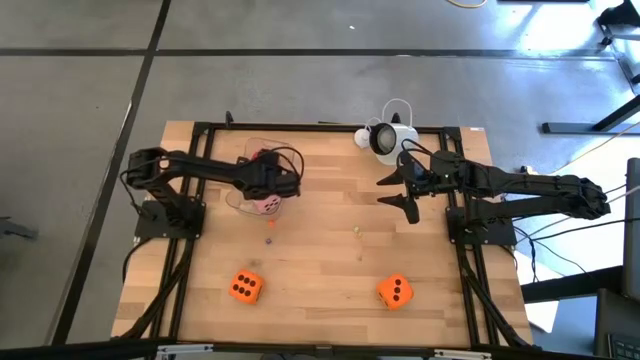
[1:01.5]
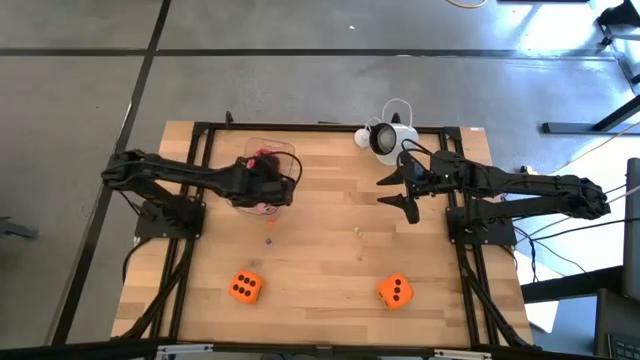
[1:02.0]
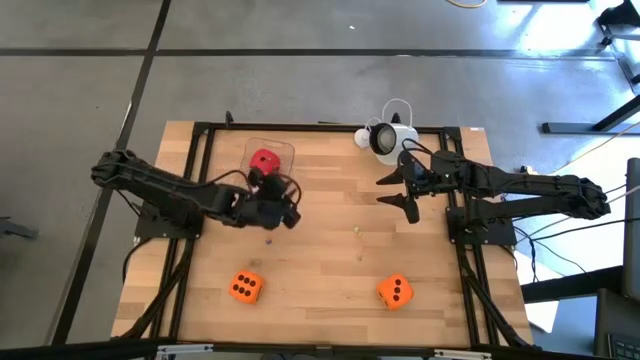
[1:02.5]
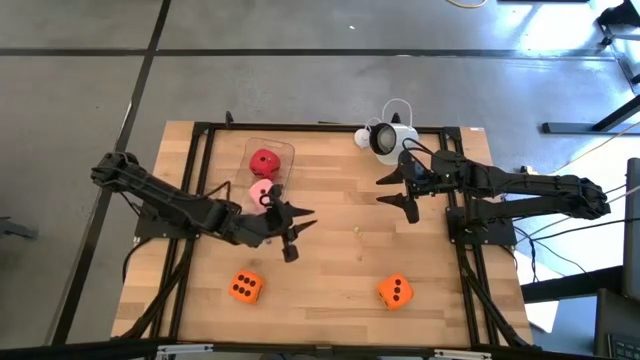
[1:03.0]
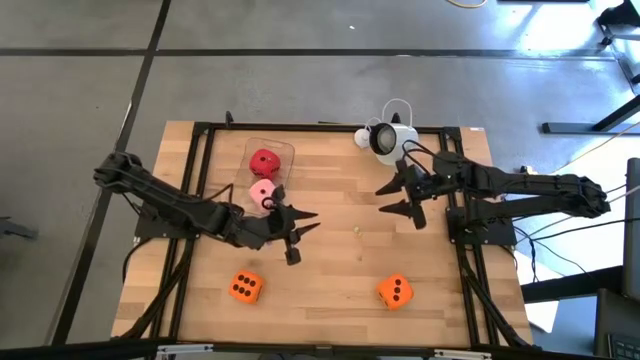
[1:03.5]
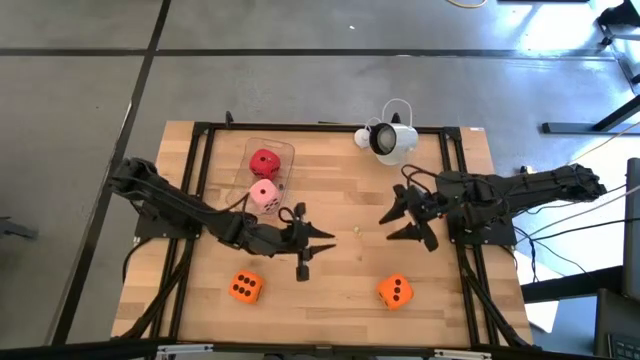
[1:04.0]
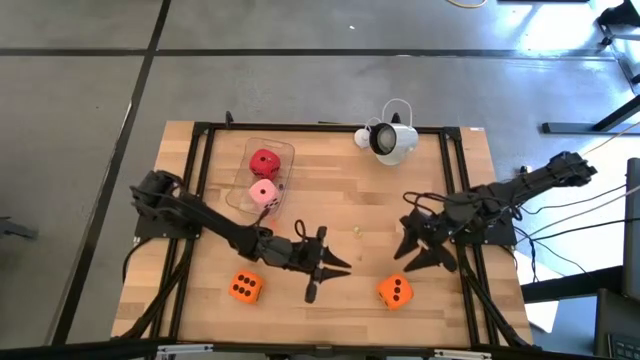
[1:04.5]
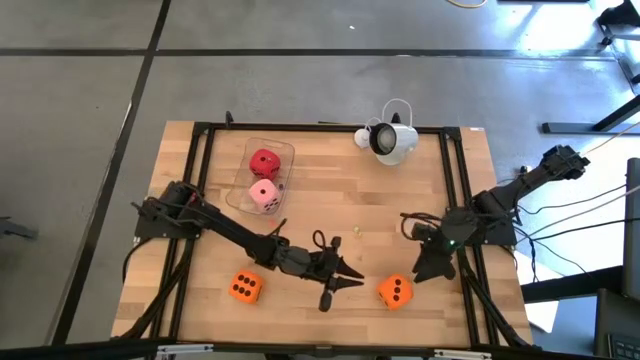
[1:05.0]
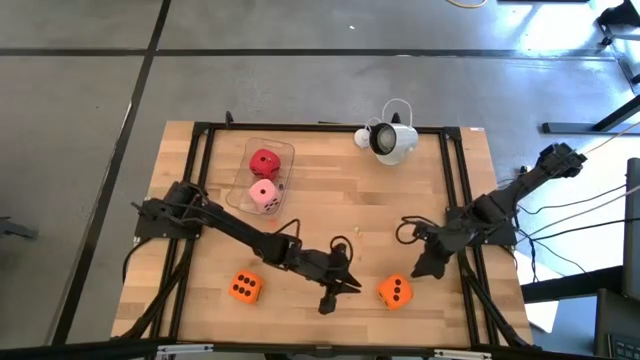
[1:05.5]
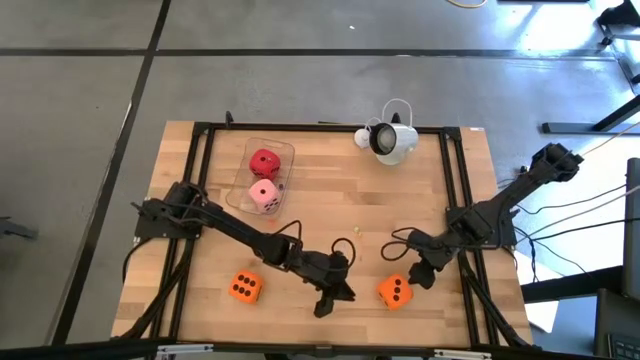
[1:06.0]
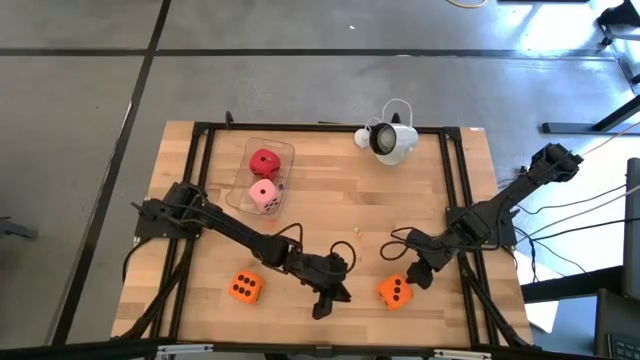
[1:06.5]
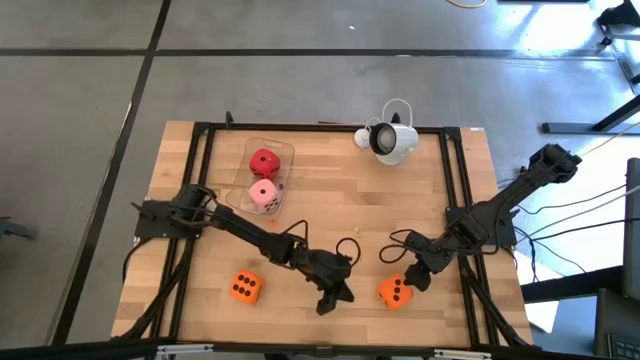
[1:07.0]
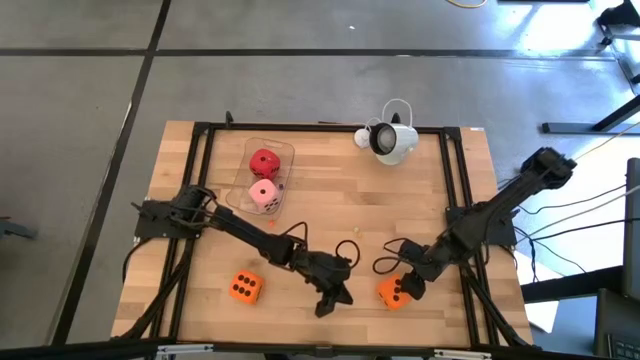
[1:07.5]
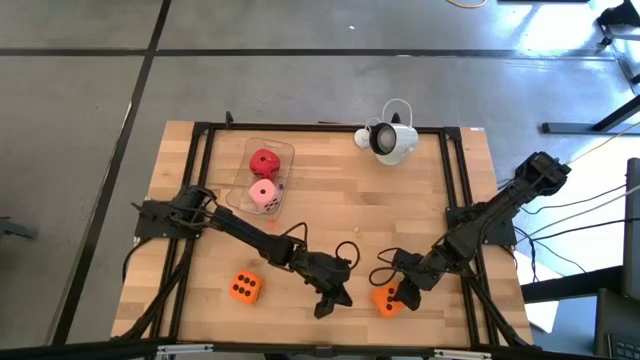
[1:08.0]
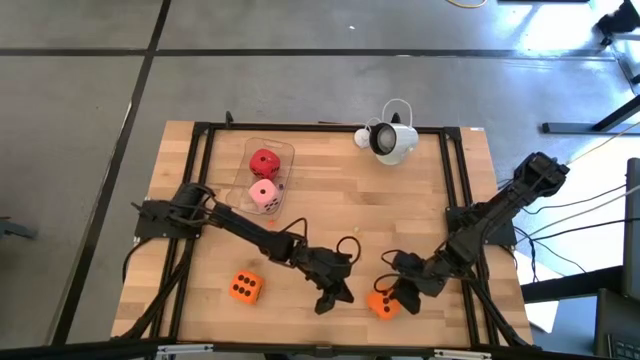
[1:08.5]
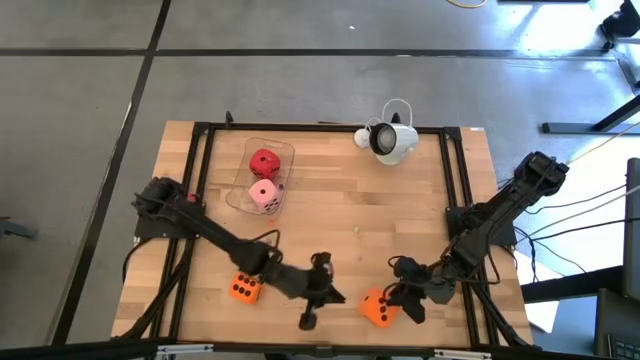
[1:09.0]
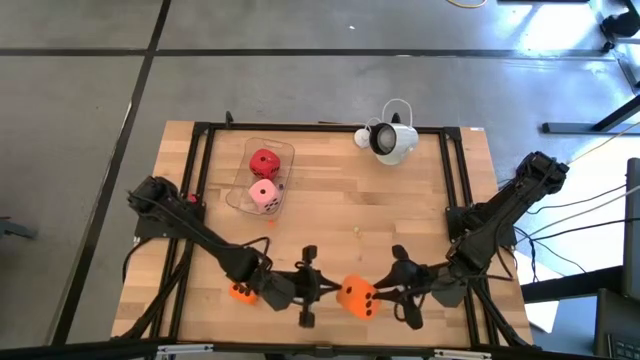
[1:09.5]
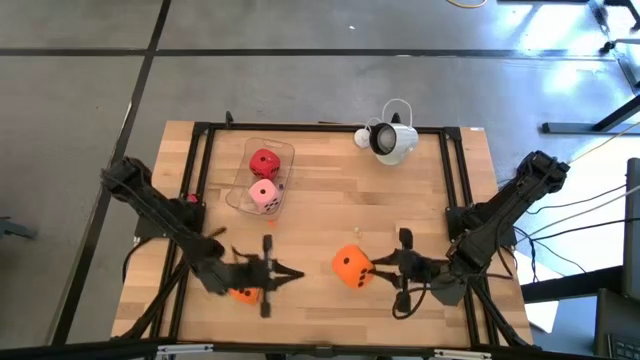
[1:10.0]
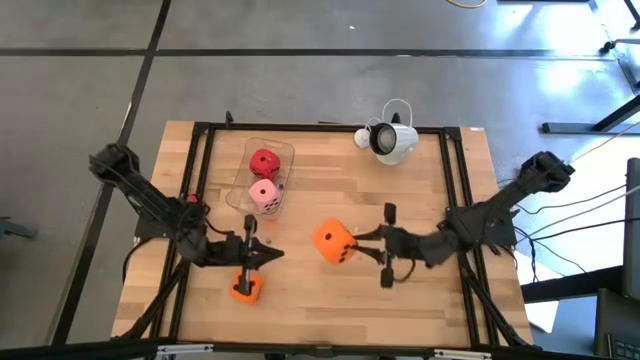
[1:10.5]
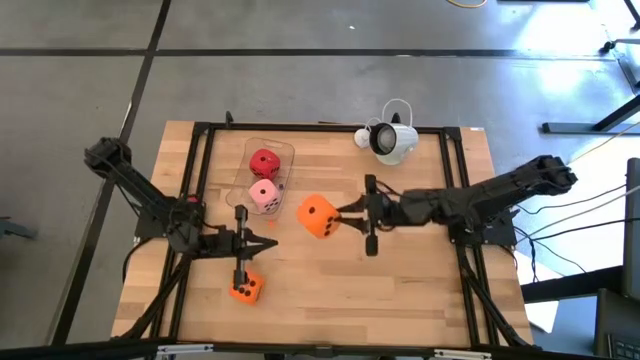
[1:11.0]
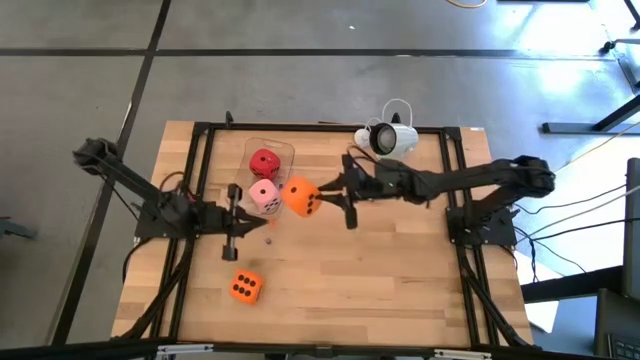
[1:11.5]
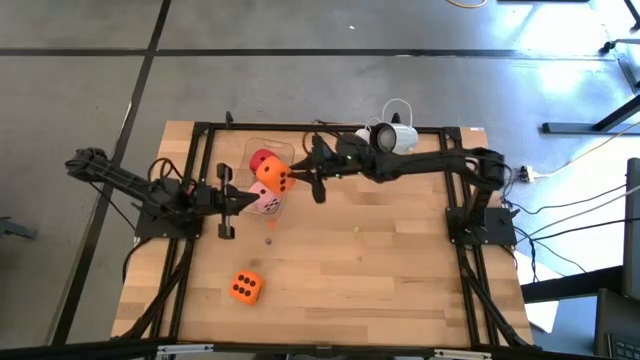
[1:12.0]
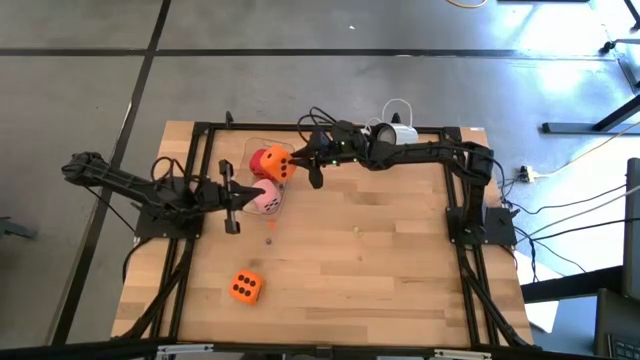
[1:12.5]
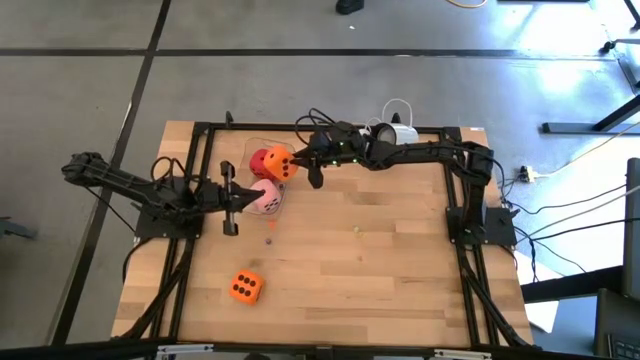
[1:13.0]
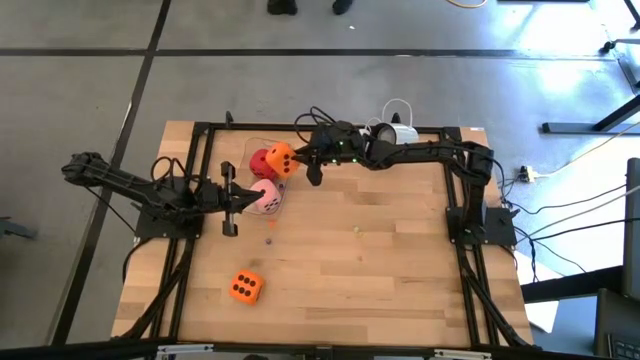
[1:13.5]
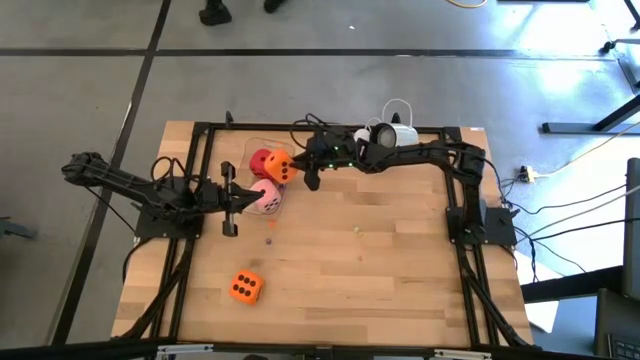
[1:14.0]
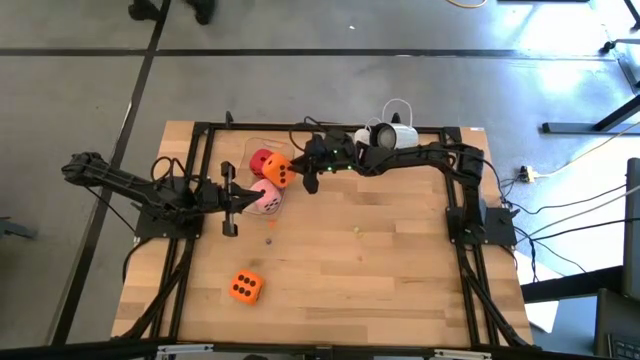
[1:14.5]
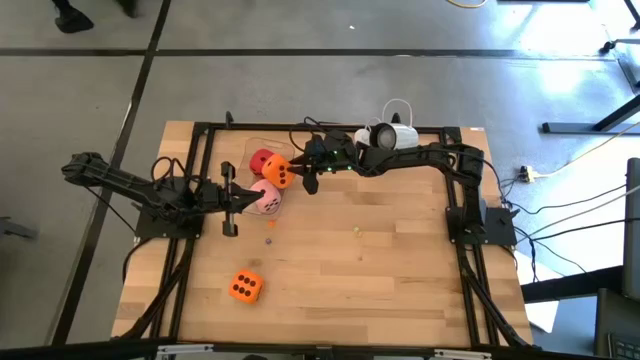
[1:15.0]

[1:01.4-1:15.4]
Task: Pick & Place Dice
Put the large orange die into the transparent bin

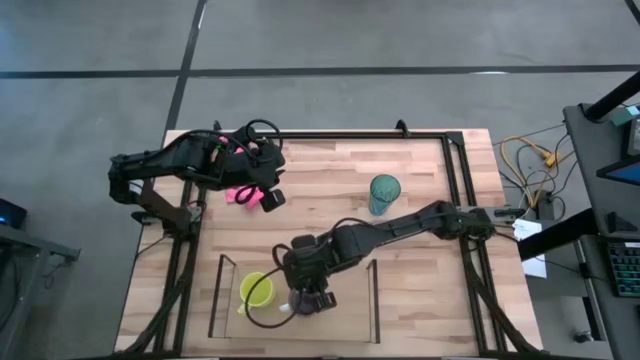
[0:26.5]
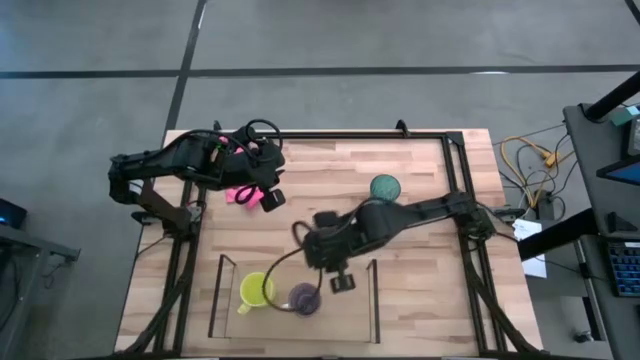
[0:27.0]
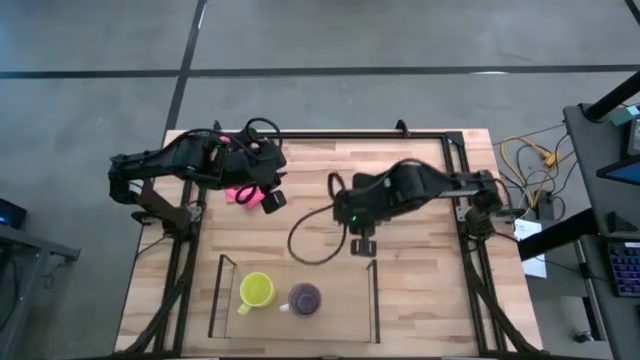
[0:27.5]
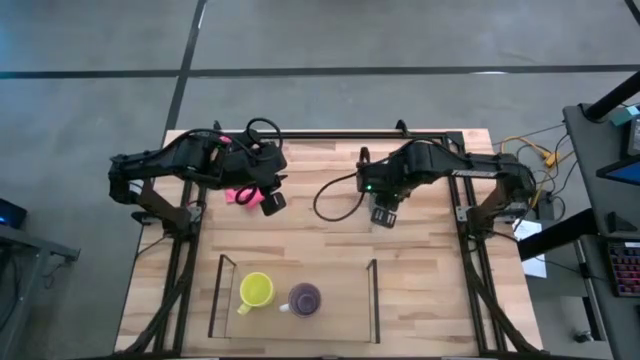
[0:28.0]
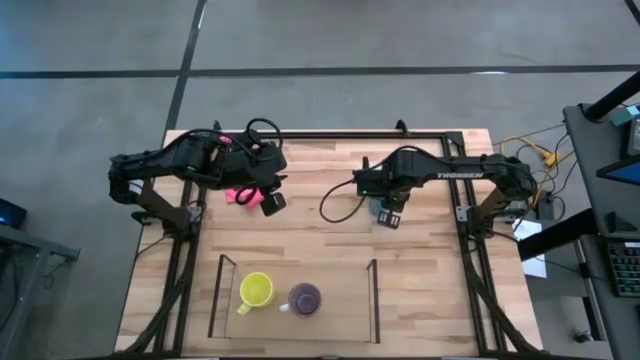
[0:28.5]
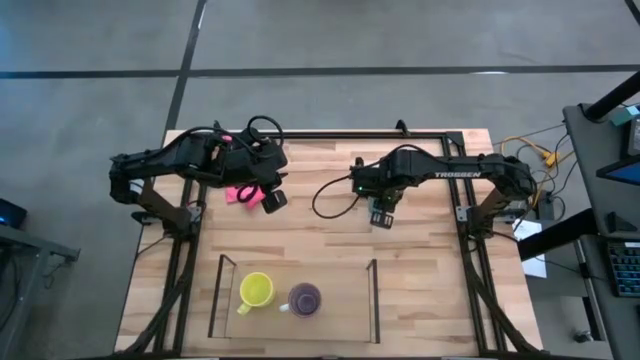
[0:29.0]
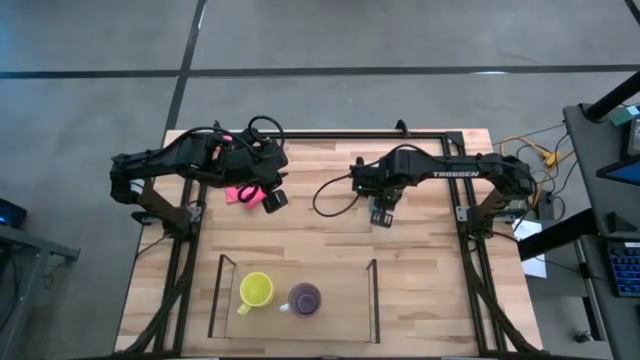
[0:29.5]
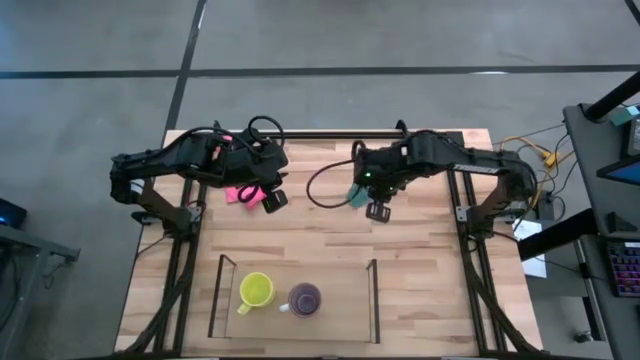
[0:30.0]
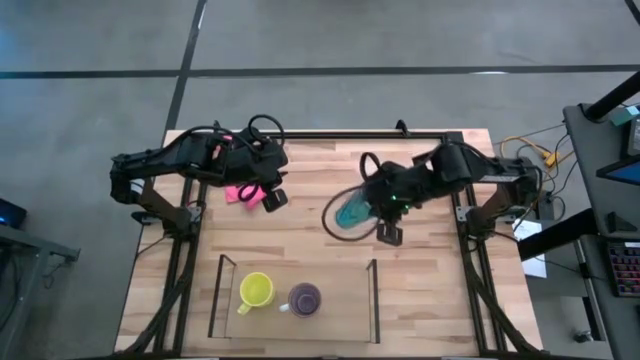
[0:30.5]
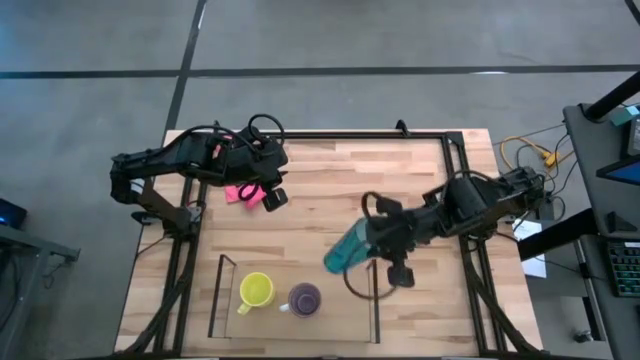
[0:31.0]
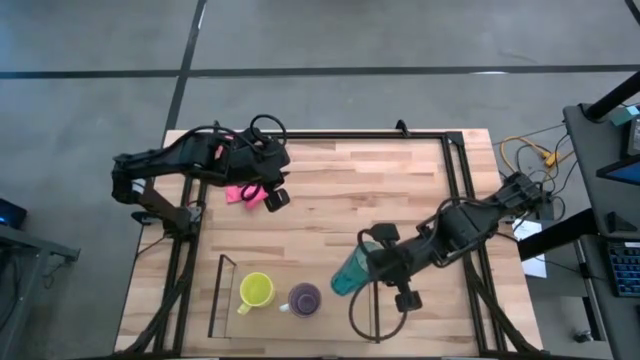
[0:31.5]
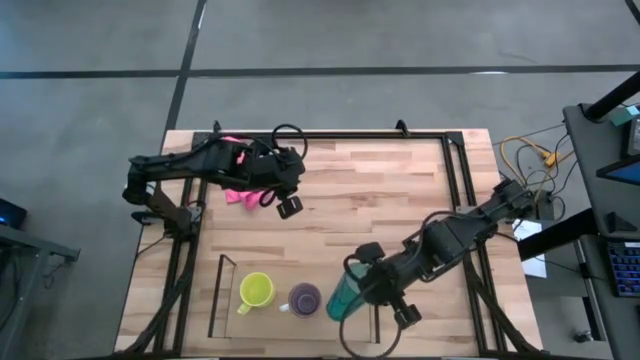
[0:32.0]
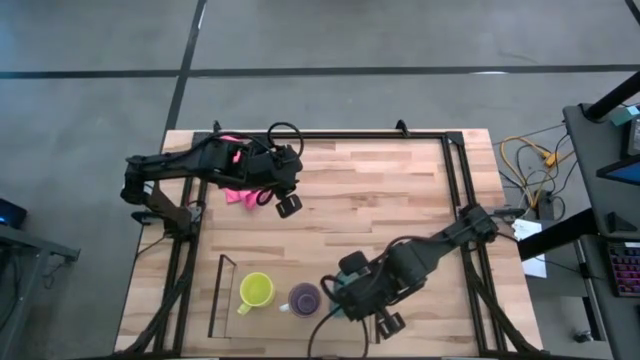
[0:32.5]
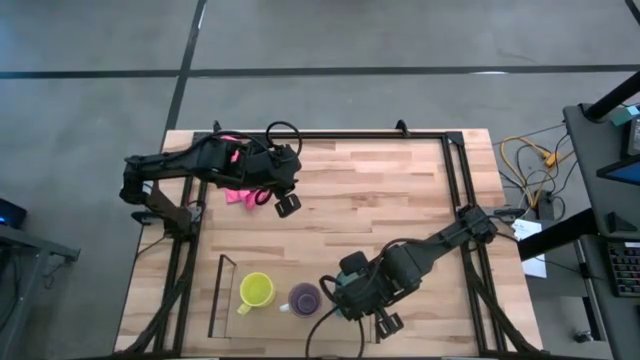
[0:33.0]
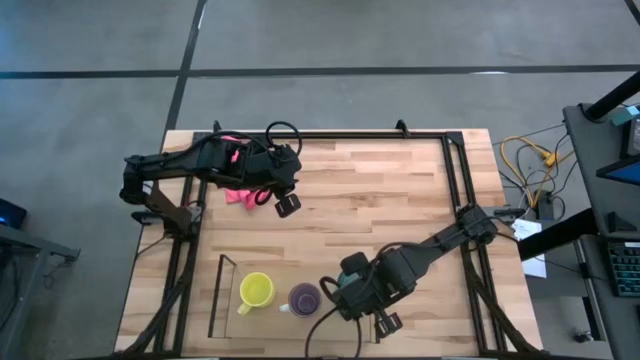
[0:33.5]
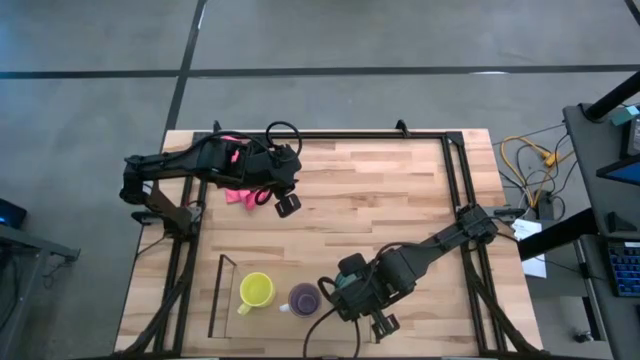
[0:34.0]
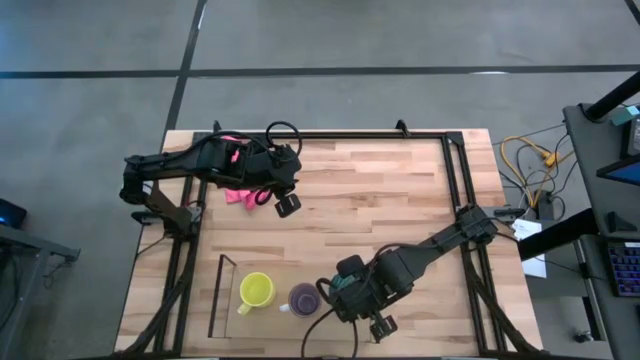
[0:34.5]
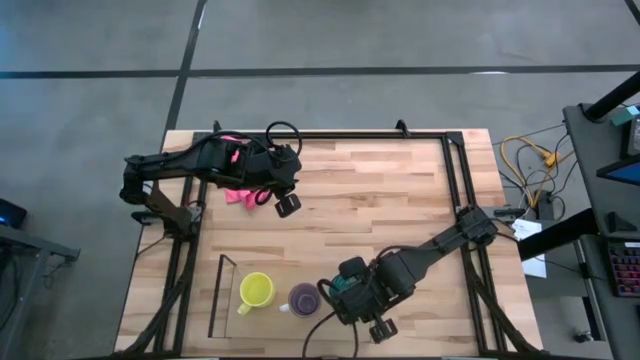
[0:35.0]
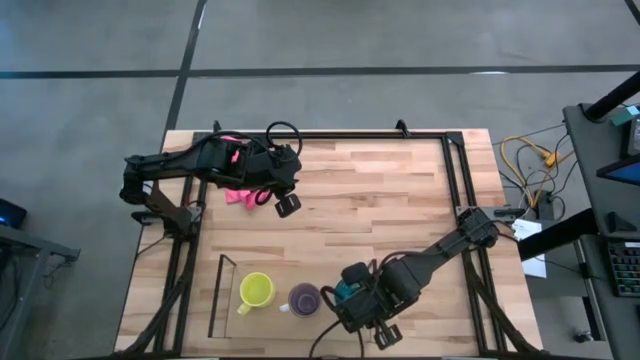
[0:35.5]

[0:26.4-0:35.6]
Task: Stack small to large cups/mugs on shelf
Put the blue cup on the shelf
